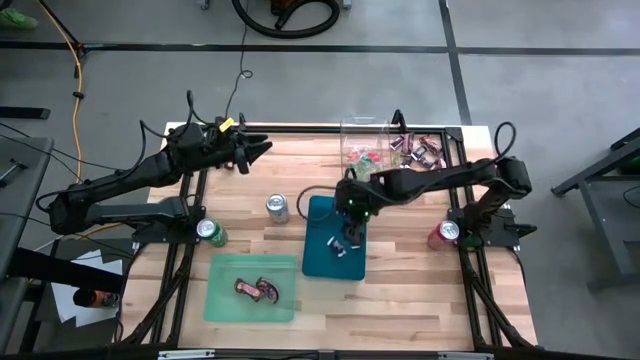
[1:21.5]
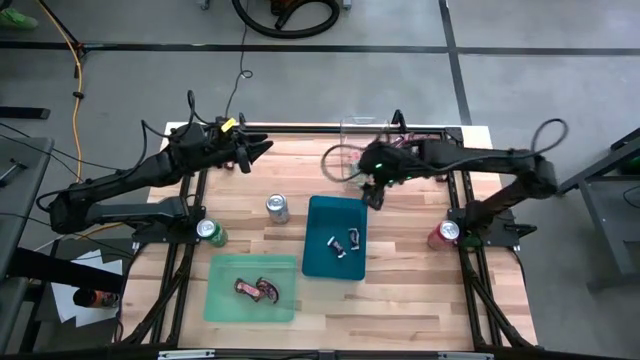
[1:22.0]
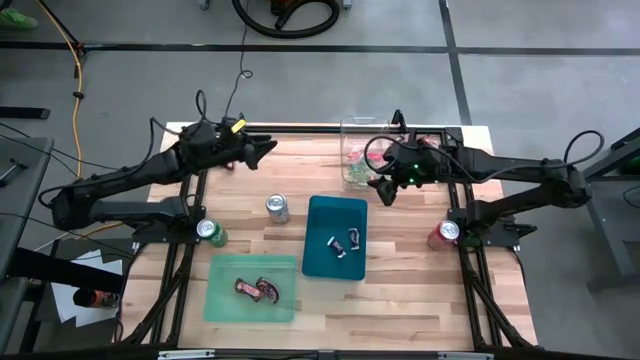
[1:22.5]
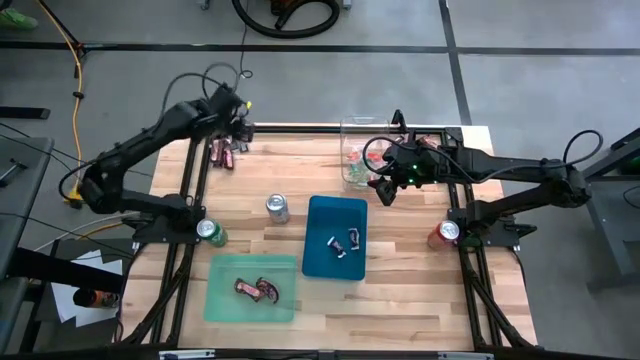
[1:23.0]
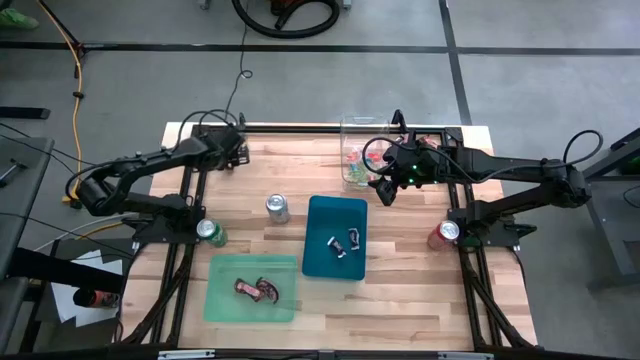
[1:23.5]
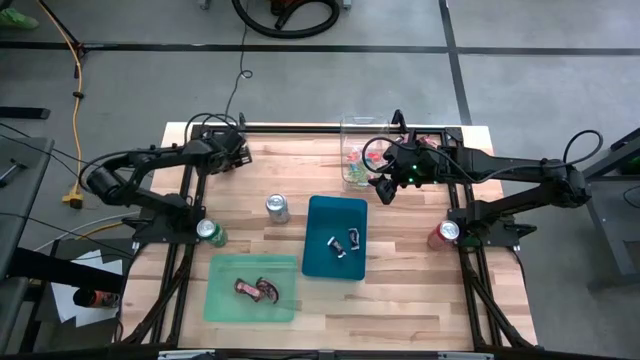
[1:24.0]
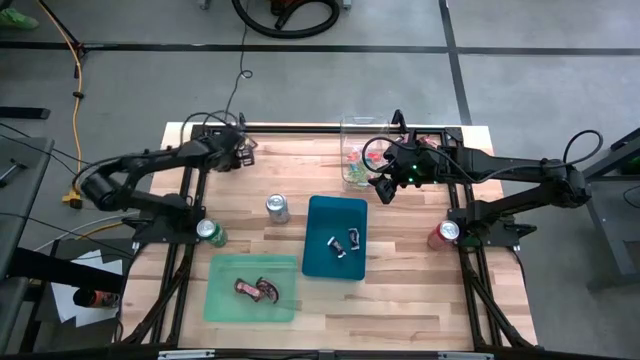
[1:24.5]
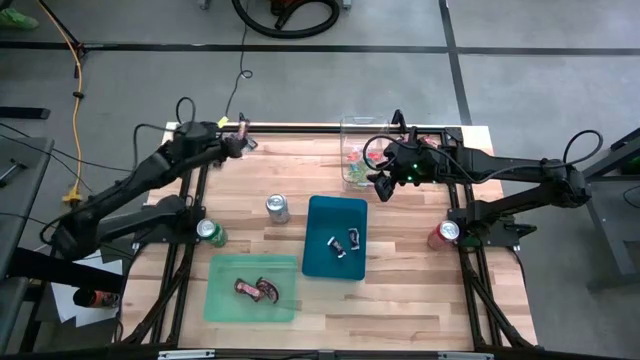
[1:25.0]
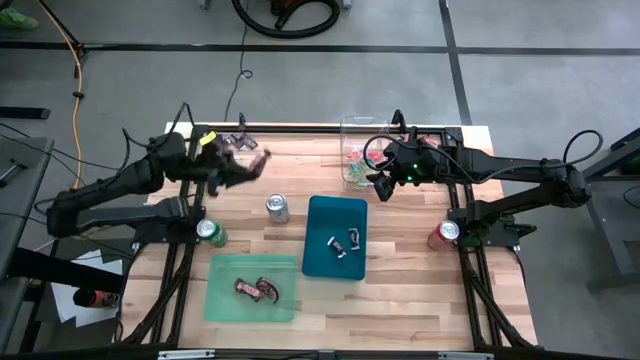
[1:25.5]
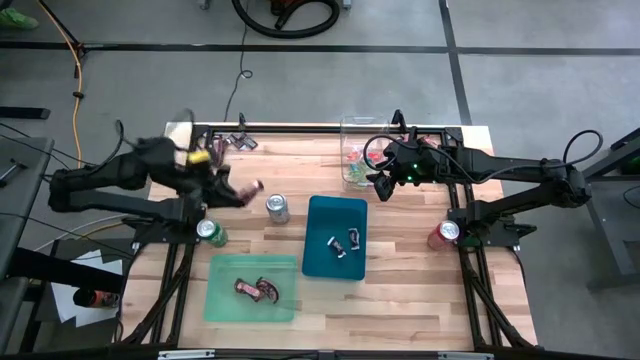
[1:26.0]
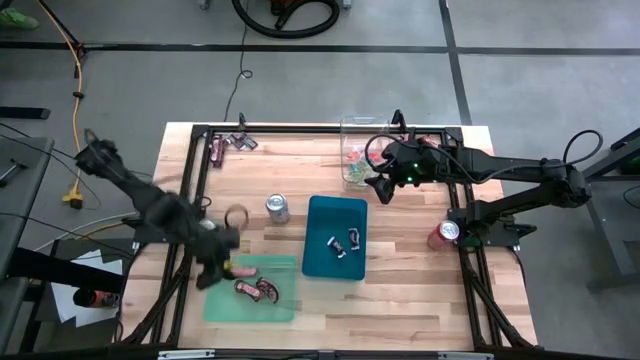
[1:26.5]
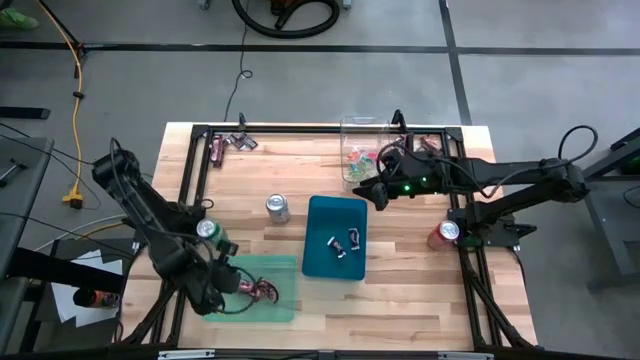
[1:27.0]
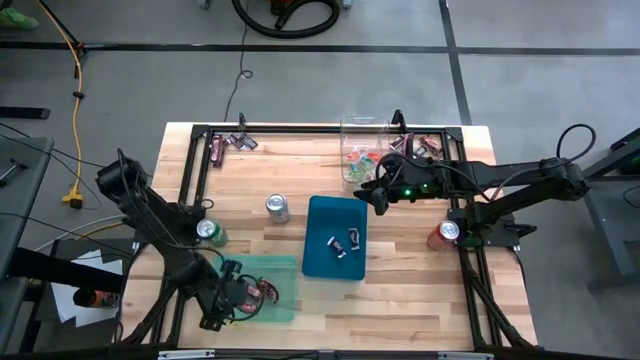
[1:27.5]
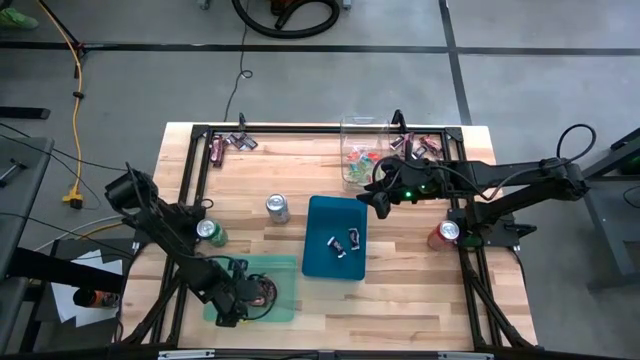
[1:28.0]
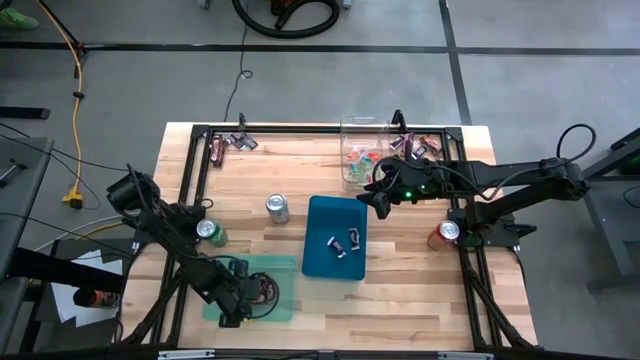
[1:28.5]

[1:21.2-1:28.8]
Task: Sort candy
Put the brown chocolate into the green bin

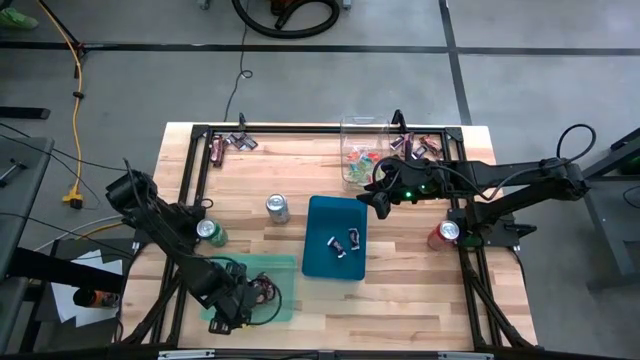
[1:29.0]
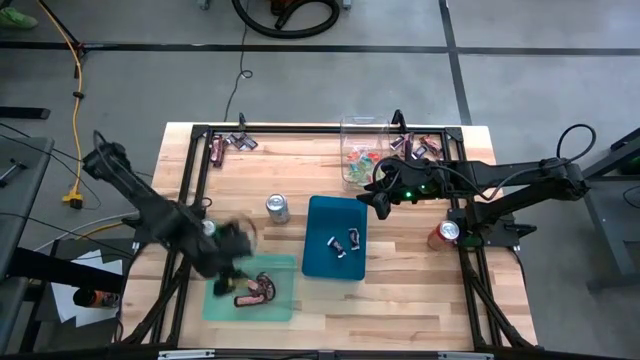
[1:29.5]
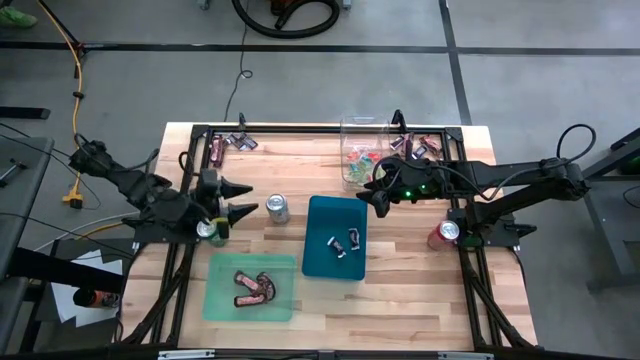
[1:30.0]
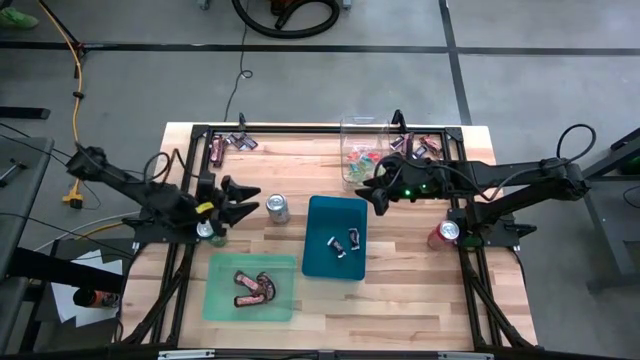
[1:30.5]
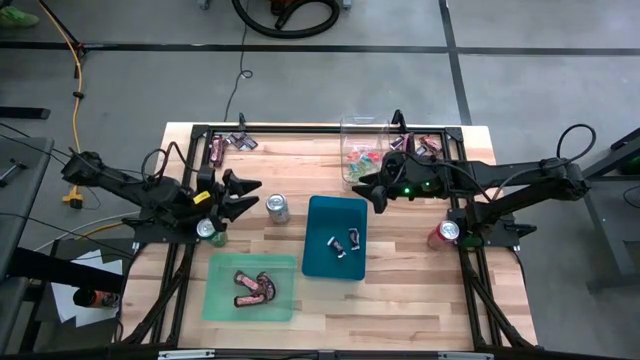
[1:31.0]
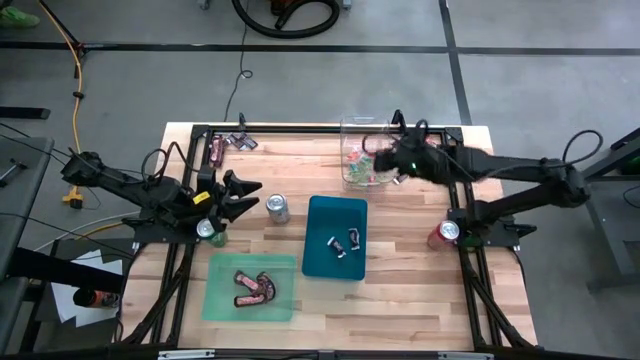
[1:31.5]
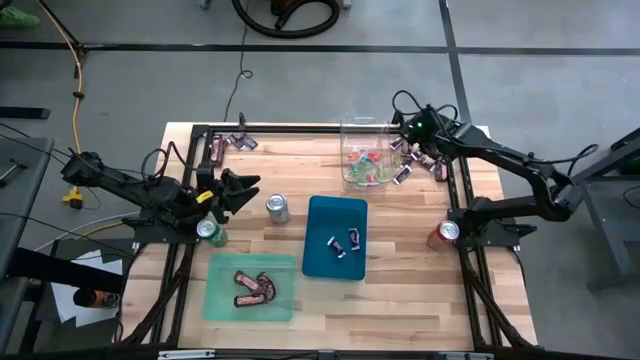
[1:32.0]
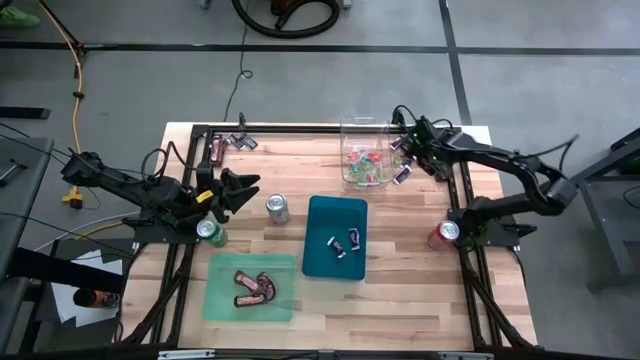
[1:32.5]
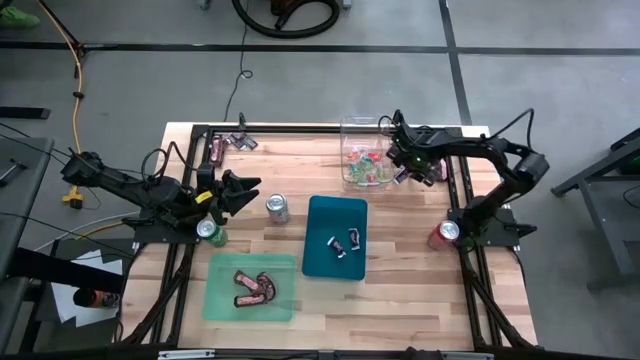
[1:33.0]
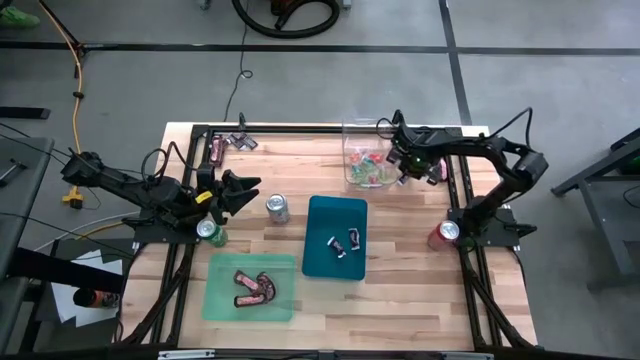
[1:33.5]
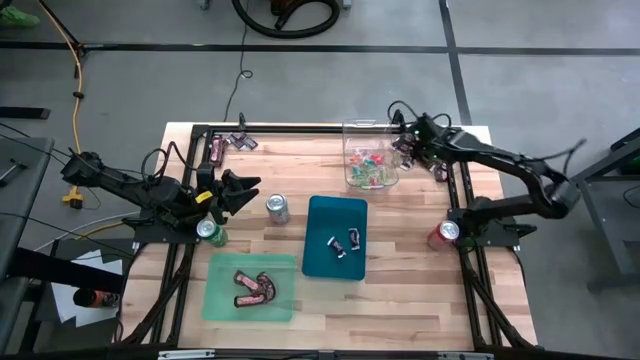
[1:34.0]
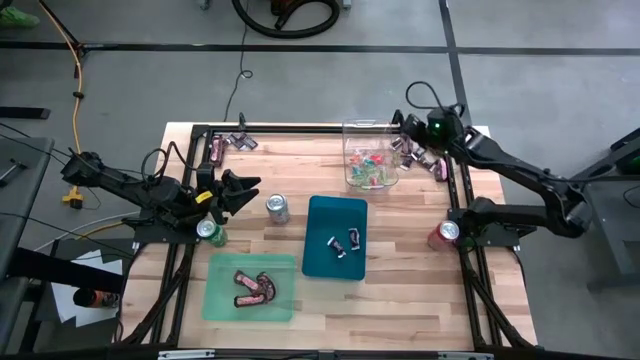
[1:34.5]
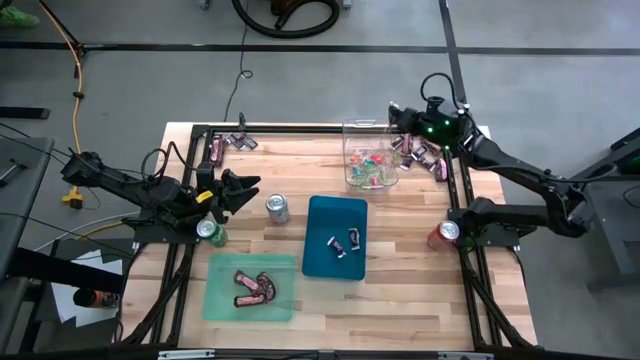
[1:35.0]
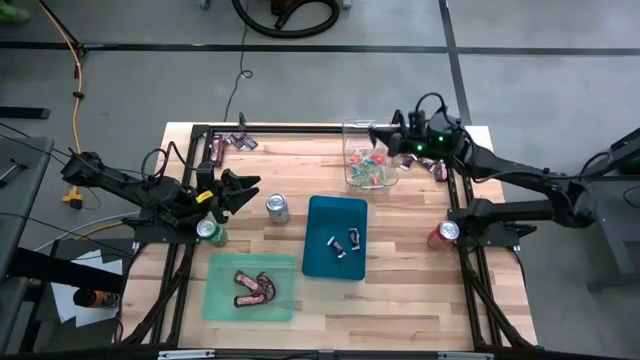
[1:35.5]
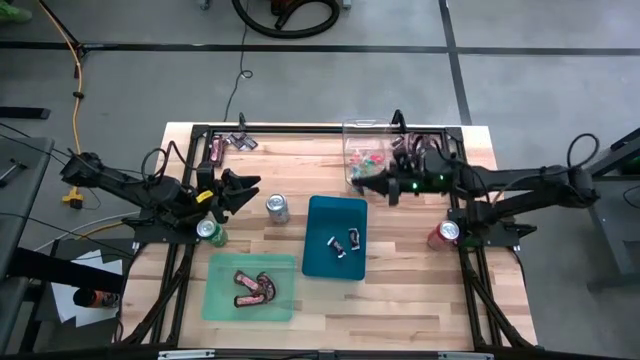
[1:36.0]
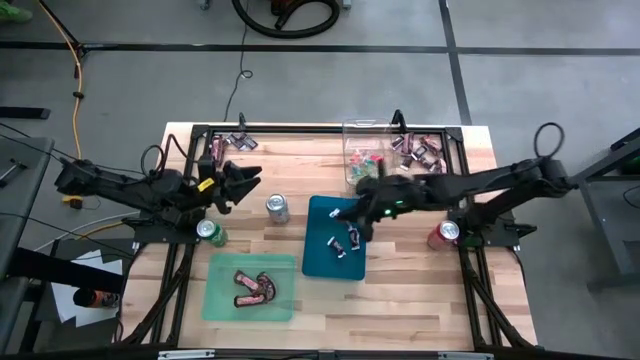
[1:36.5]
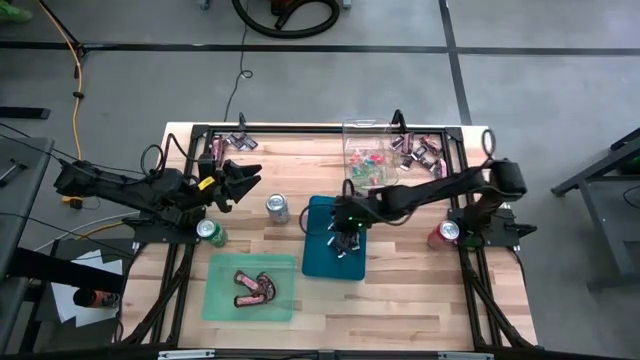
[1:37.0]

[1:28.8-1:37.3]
Put the brown-white chocolate into the blue bin

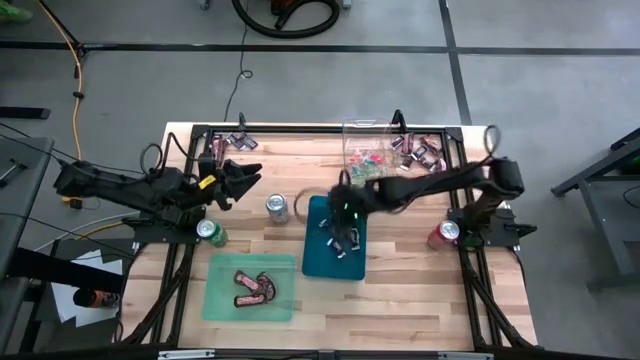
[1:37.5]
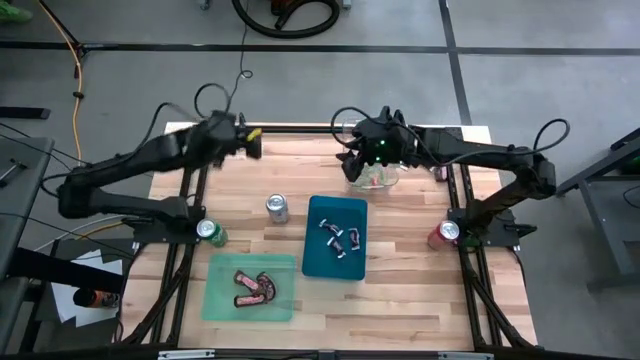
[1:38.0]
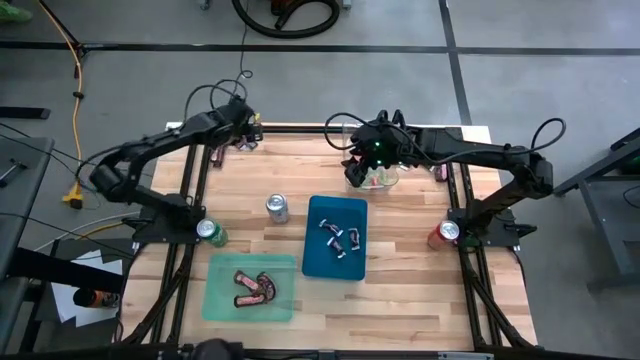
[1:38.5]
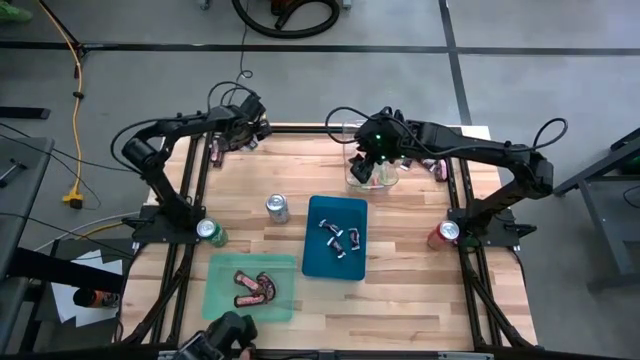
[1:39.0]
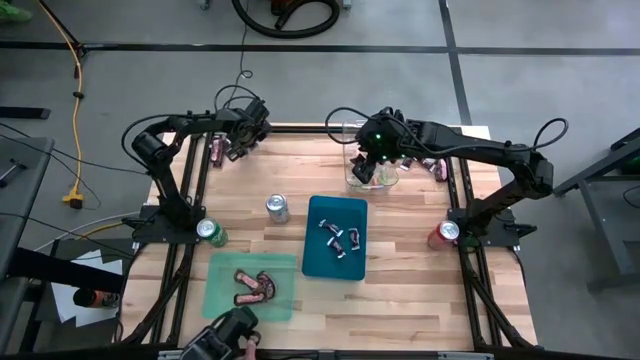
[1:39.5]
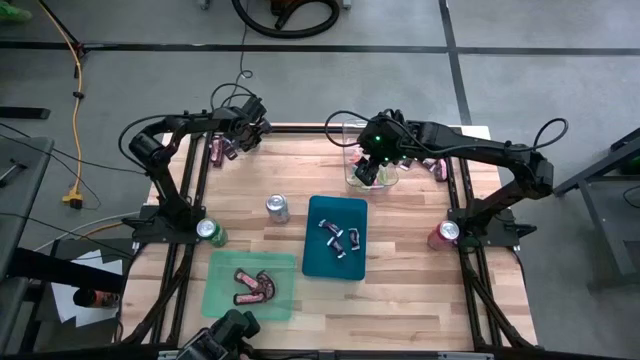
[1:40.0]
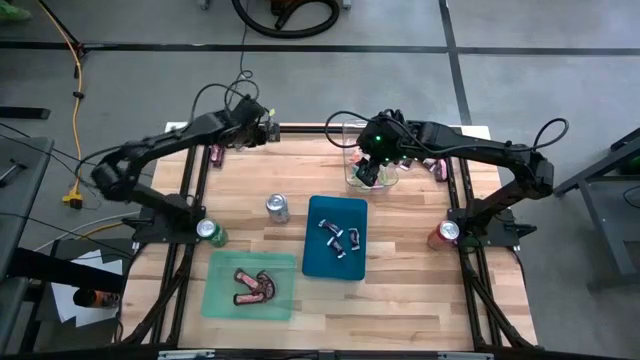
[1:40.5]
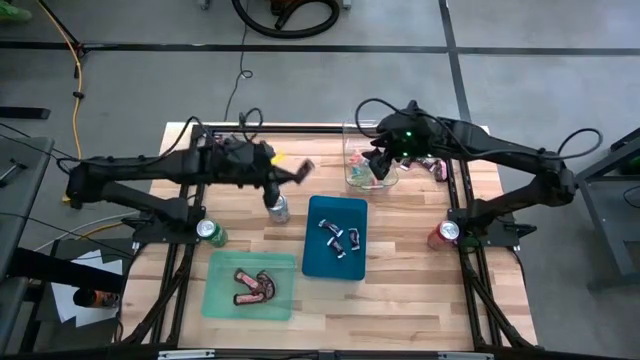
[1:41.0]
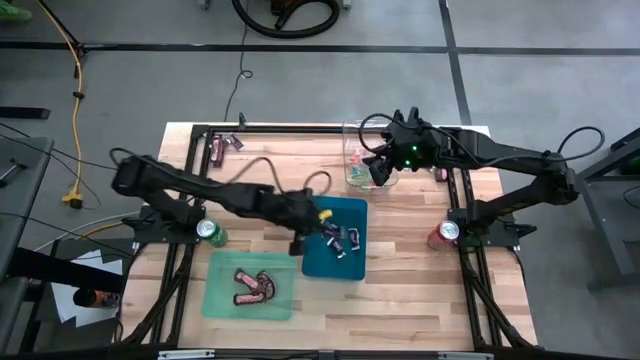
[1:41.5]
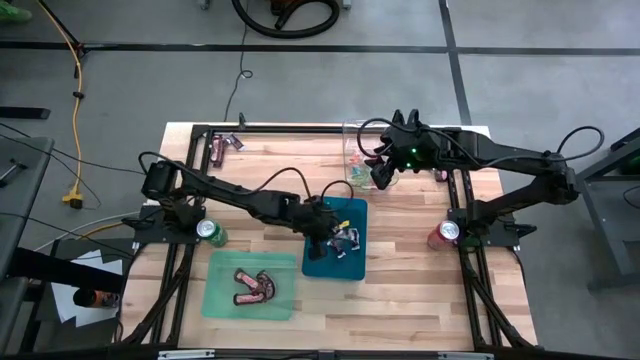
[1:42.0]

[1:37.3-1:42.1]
Put the brown-white chocolate into the blue bin

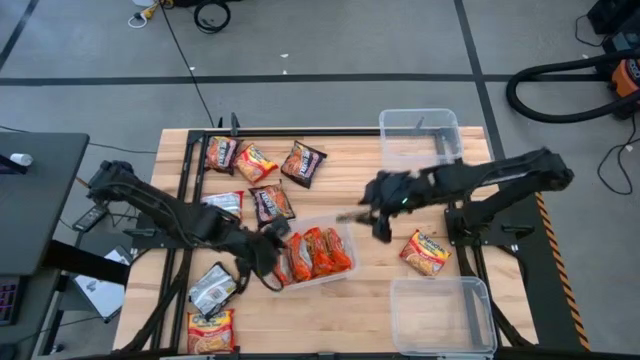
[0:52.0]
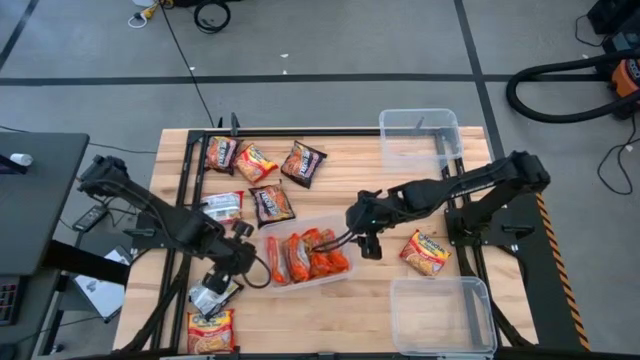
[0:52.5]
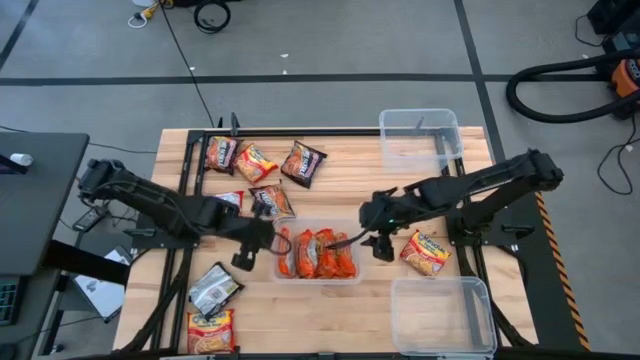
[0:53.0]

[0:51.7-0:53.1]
Task: Sort Maruchan noodles
Adjust the bottom left transparent bin
